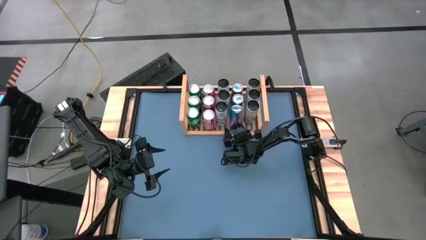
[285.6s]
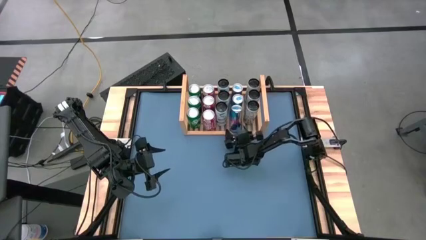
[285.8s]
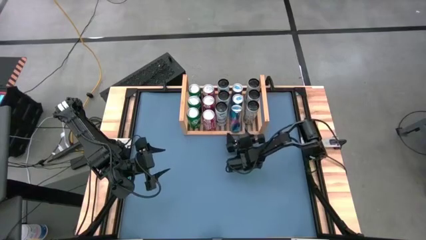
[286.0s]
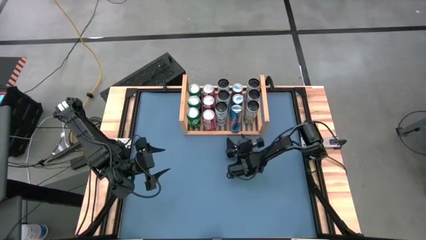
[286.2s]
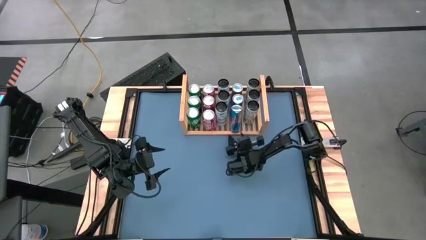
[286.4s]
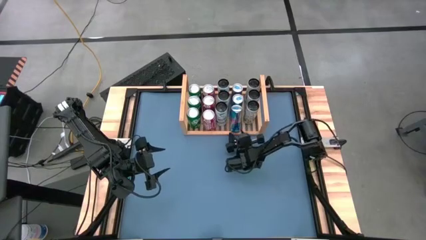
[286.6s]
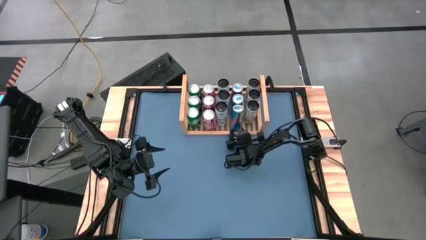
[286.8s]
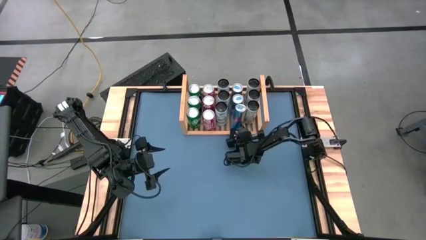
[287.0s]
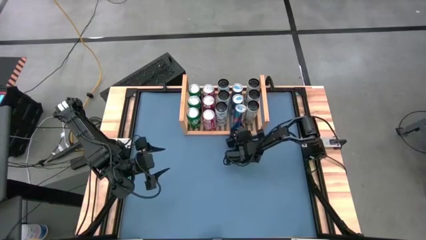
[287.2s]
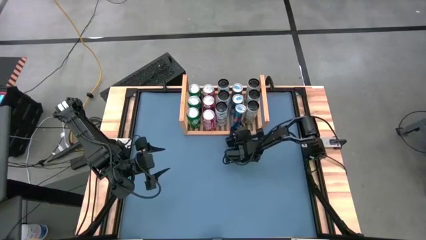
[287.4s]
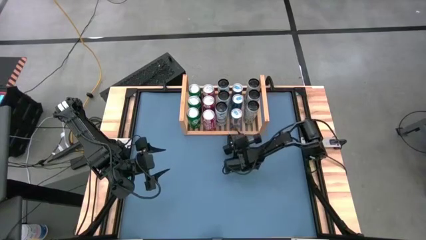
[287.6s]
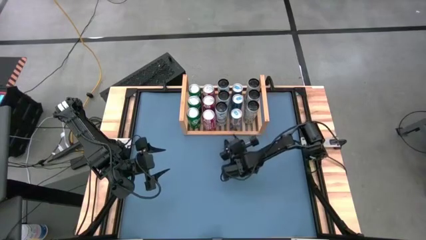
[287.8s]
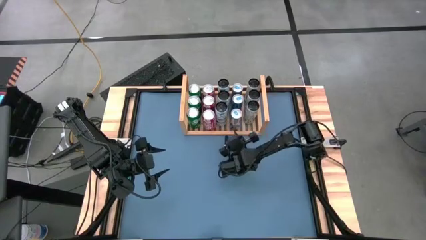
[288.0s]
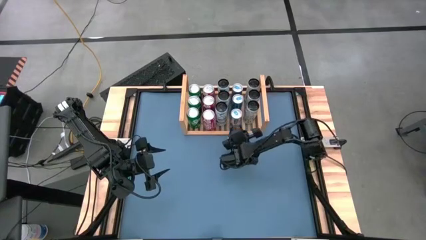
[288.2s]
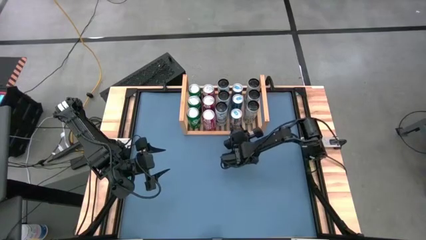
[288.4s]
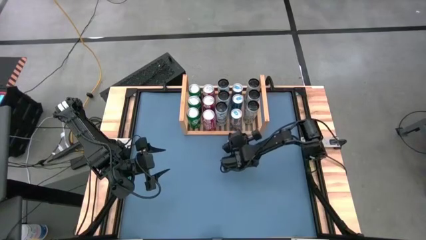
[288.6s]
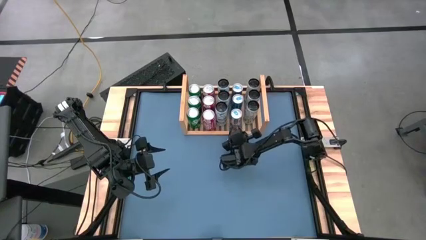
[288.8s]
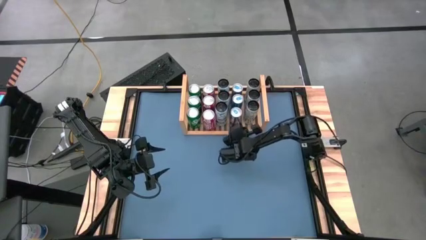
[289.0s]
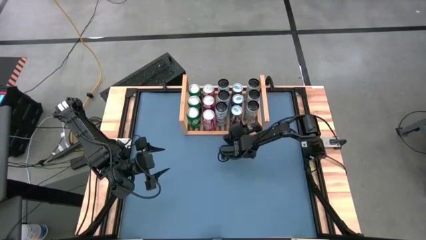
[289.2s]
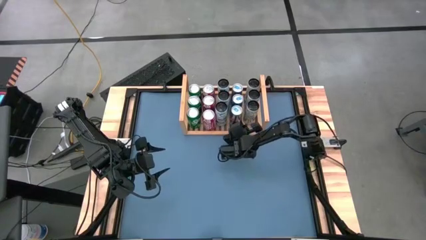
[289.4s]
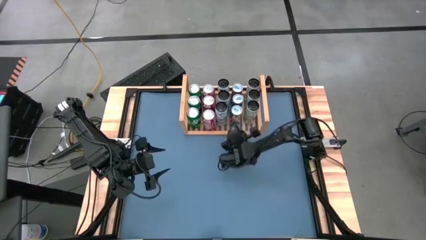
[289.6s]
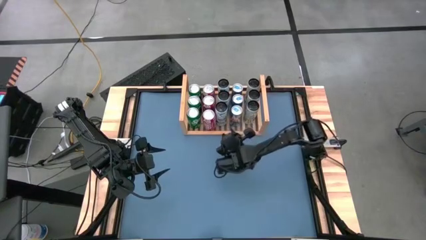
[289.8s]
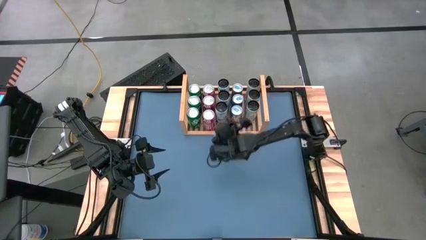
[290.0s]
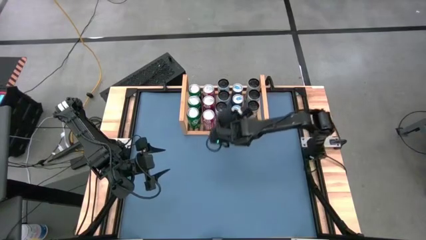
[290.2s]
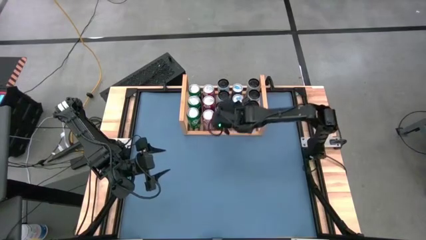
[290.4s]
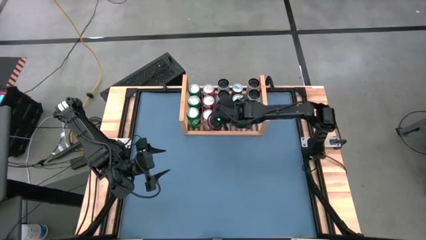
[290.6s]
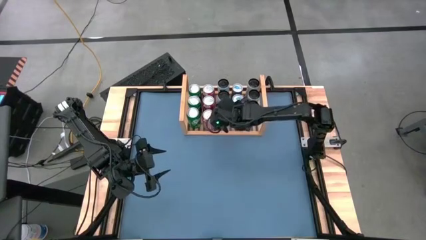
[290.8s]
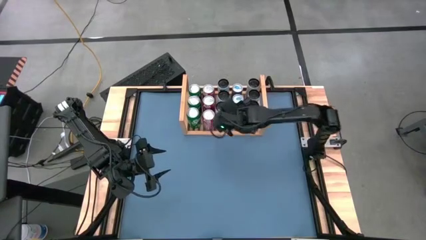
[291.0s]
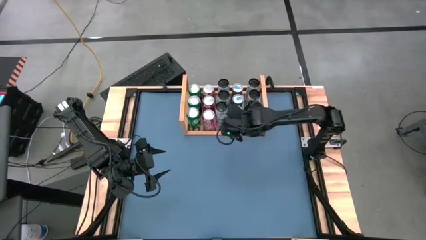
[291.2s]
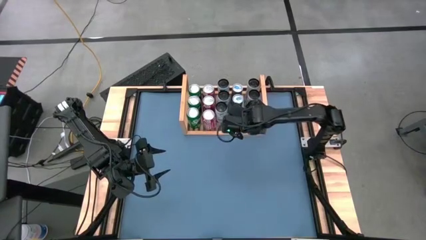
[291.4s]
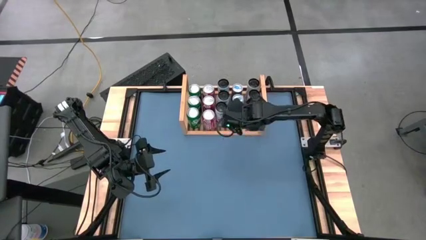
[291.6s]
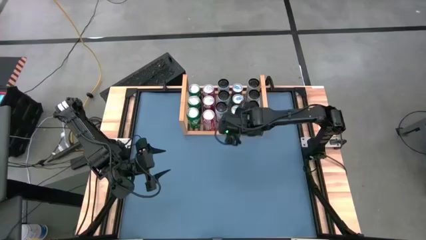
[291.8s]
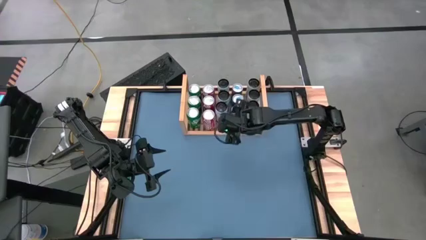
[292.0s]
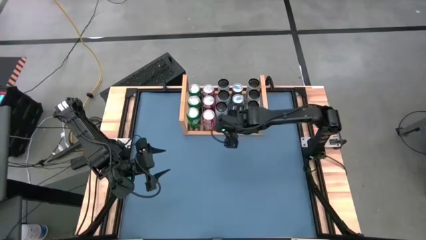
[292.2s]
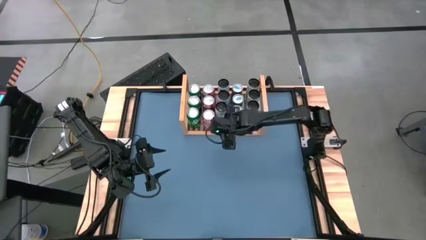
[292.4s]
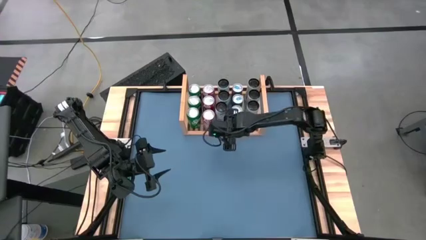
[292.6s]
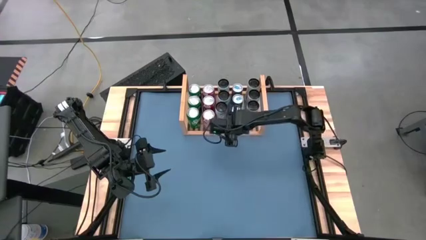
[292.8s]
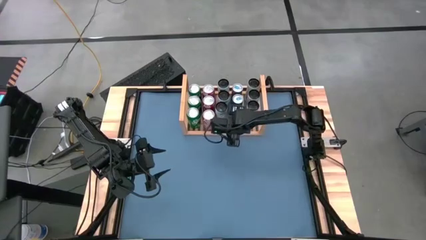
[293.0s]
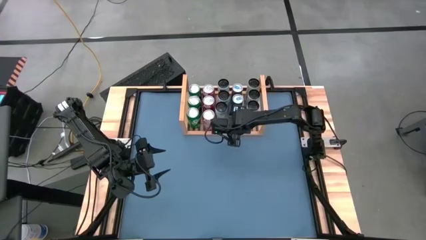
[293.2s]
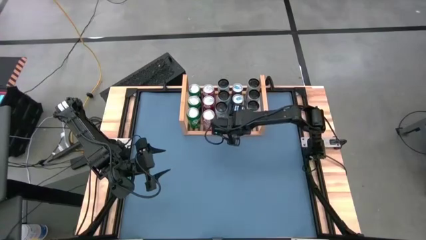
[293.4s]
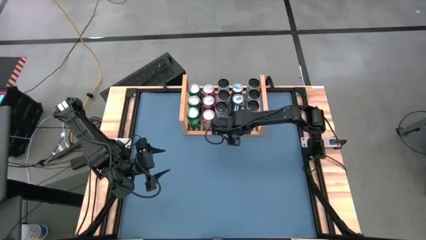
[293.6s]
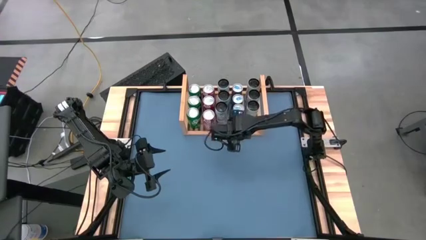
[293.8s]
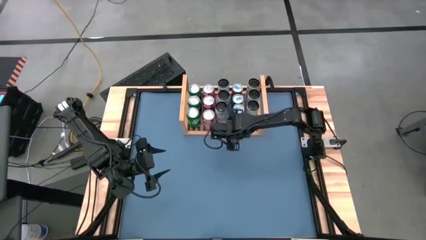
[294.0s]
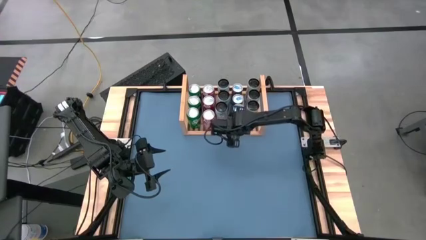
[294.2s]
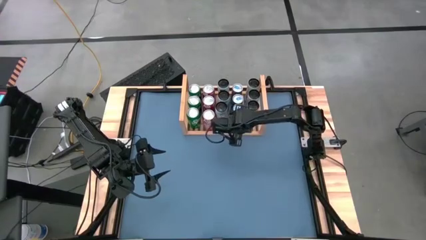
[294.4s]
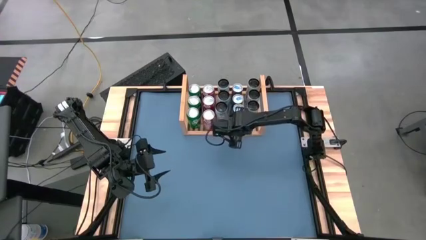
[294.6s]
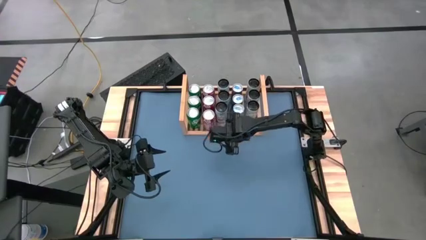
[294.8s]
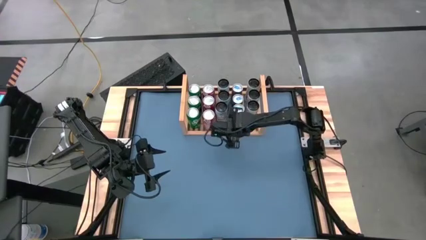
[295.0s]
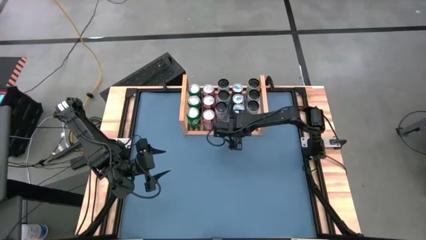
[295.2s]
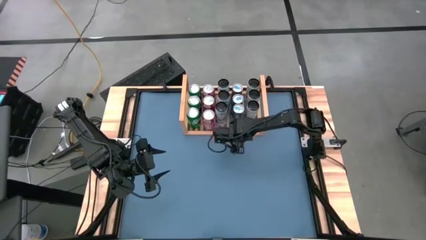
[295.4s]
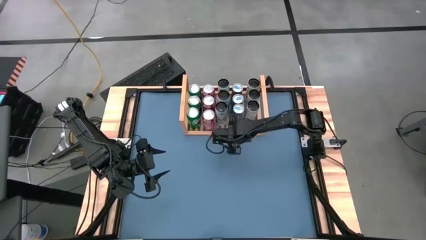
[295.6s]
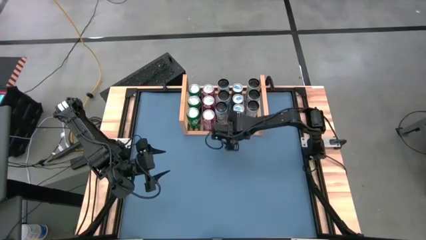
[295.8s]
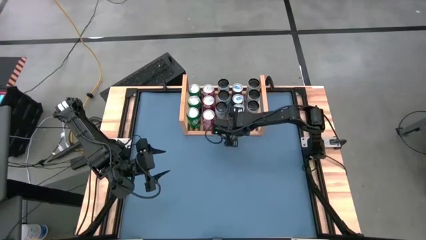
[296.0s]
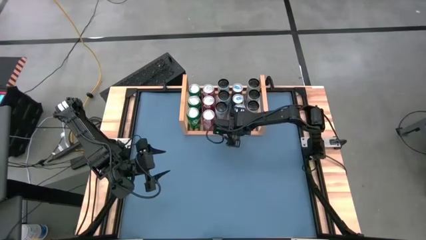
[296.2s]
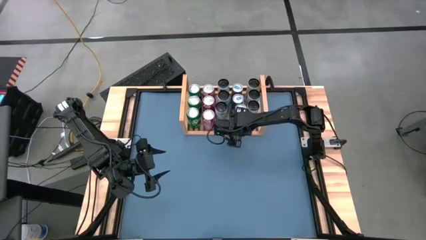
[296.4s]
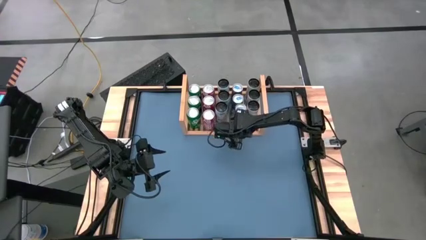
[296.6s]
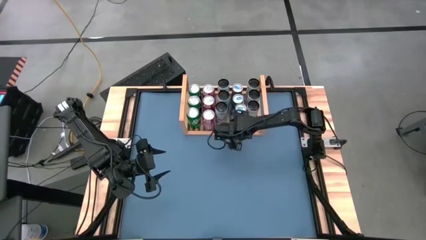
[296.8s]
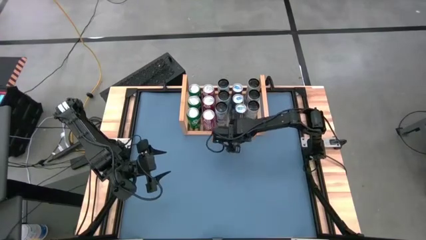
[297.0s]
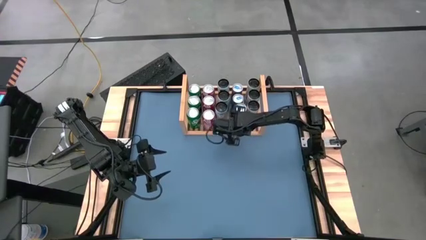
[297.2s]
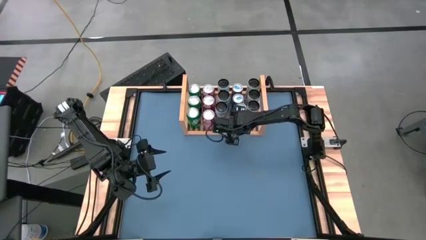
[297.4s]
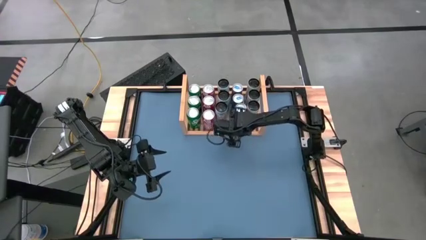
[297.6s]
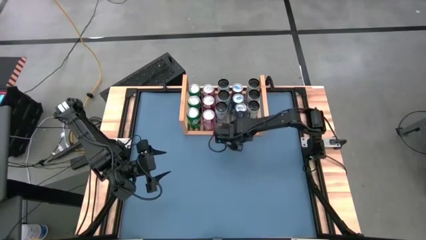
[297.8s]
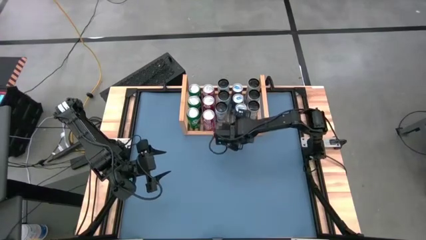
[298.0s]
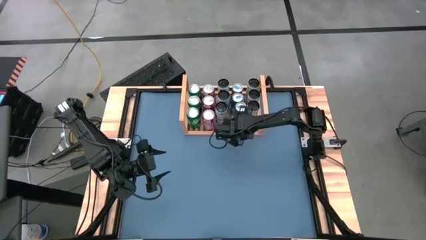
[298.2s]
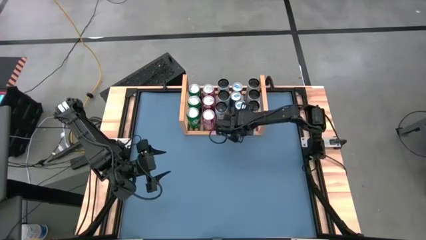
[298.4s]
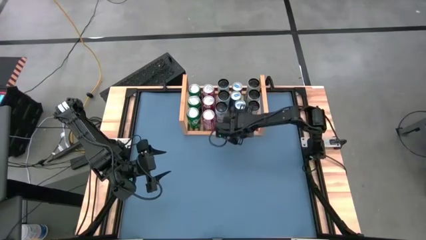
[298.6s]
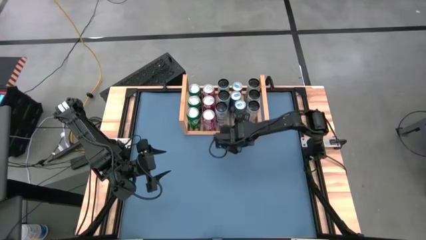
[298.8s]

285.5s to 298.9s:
Task: Place canned beverage on shelf
Adjust the blue soda on the shelf

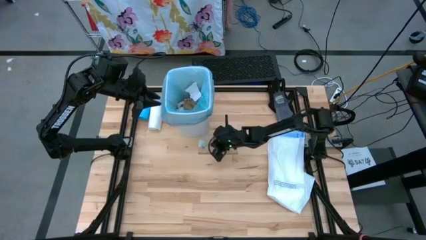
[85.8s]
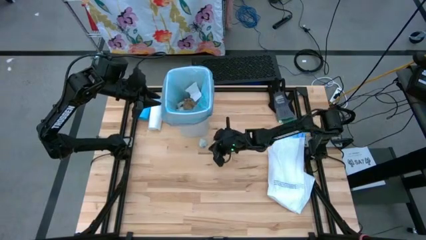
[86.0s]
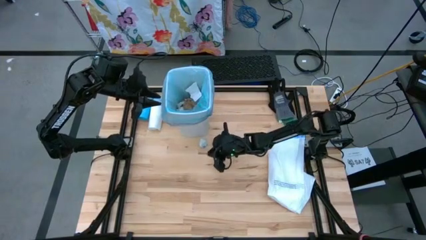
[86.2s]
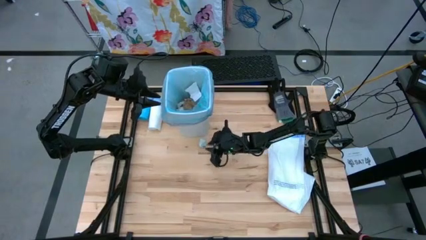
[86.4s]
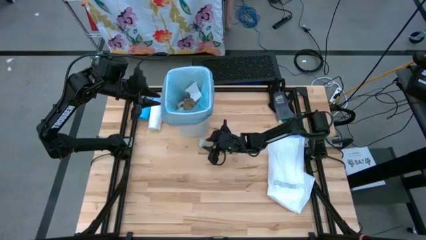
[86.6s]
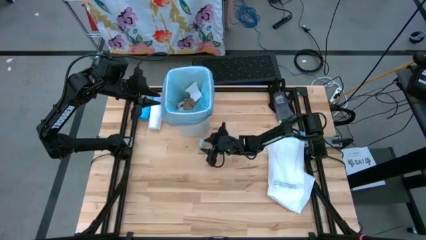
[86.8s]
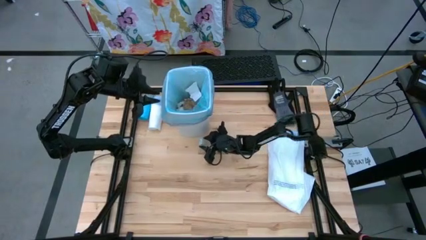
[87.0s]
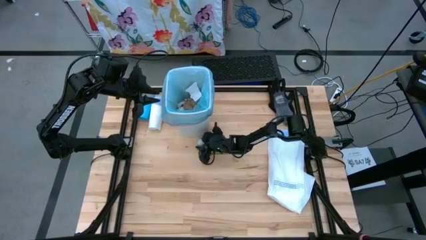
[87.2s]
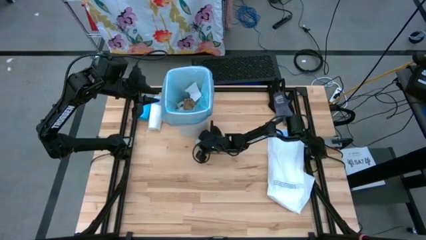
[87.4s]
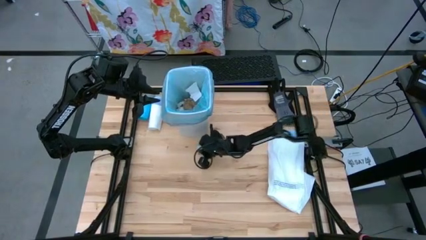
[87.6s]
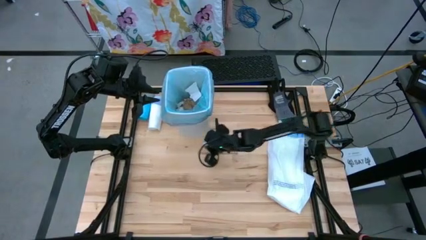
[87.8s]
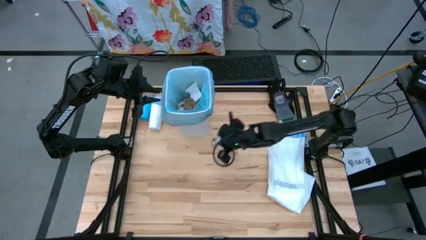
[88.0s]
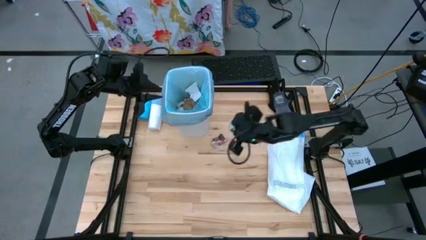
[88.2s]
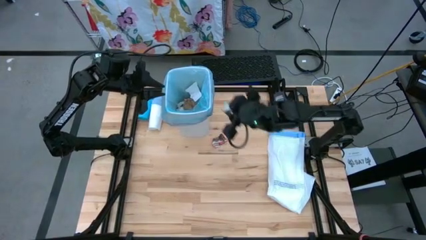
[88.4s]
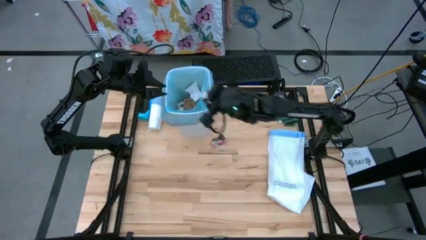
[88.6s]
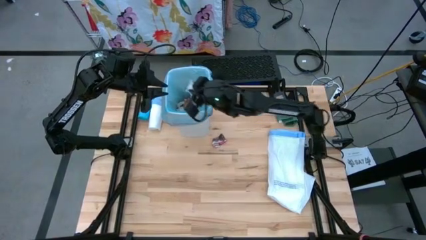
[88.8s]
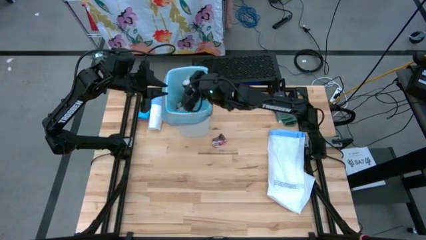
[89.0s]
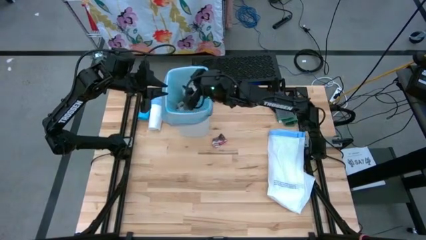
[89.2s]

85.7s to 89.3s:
Task: place trash/remove bag and relplace
Put the blue trash bag into the white trash bin

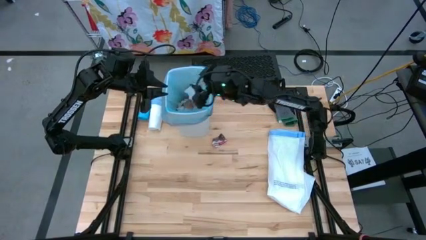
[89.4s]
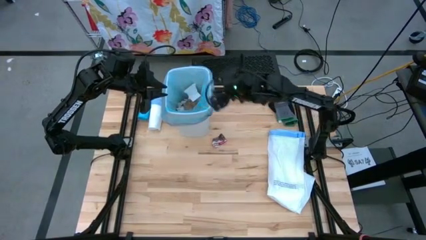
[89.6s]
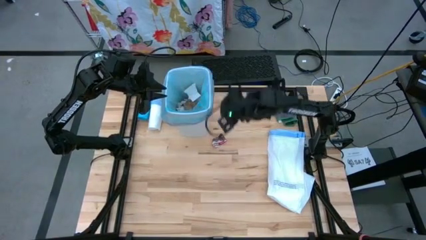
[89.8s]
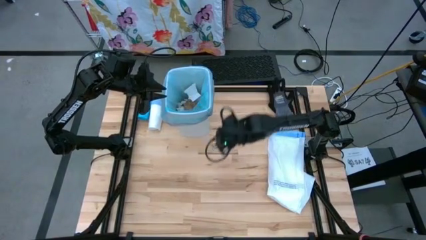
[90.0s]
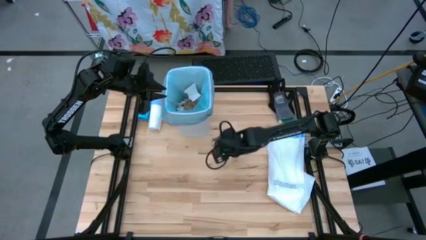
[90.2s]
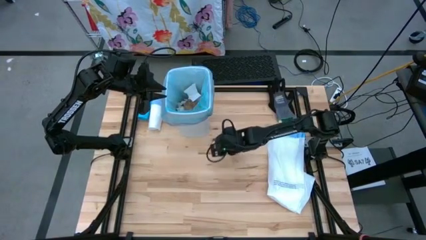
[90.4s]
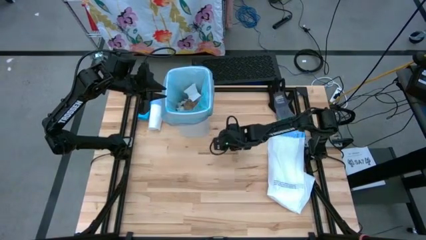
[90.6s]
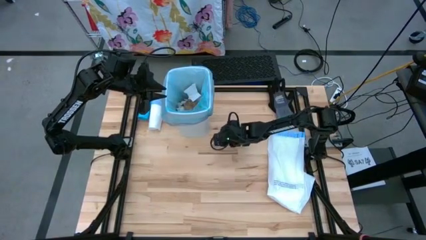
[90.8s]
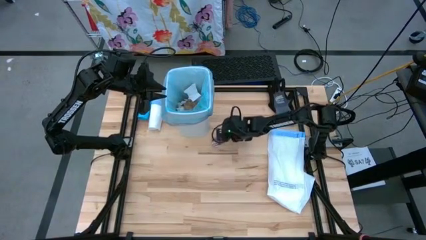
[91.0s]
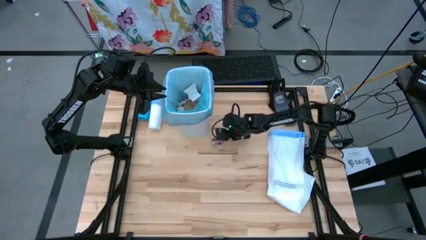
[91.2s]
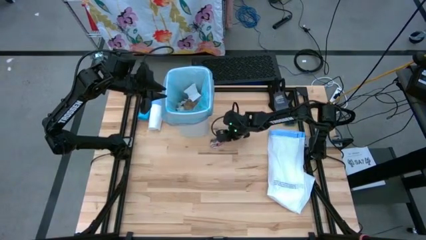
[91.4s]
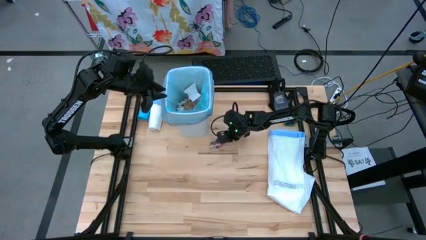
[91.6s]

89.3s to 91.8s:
Put the black paper into the white trash bin
